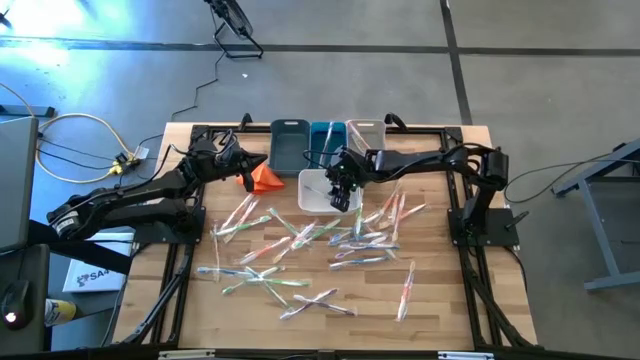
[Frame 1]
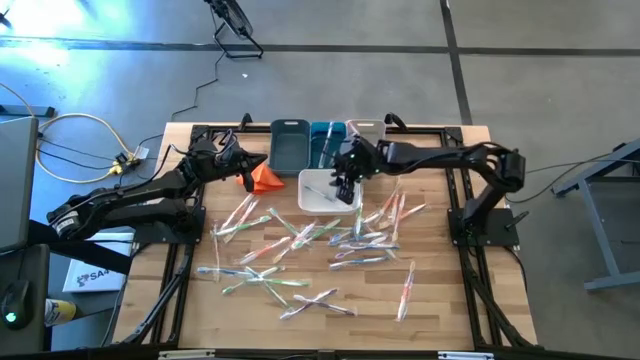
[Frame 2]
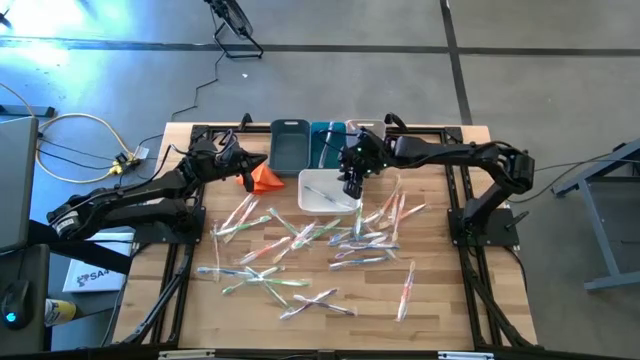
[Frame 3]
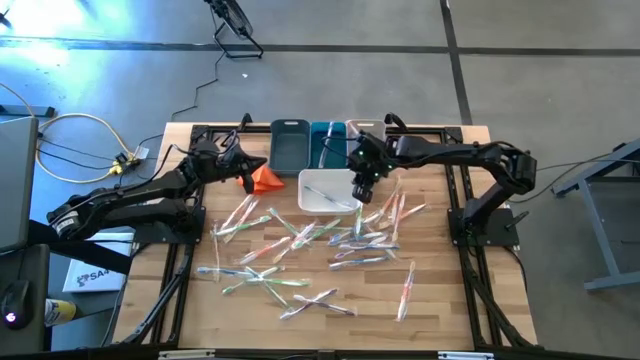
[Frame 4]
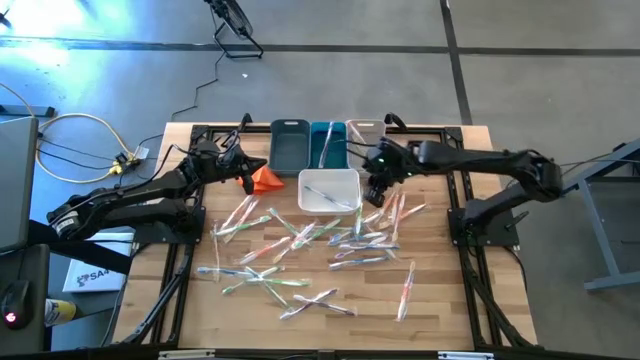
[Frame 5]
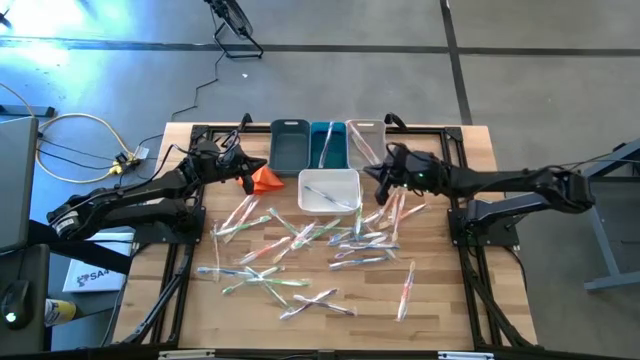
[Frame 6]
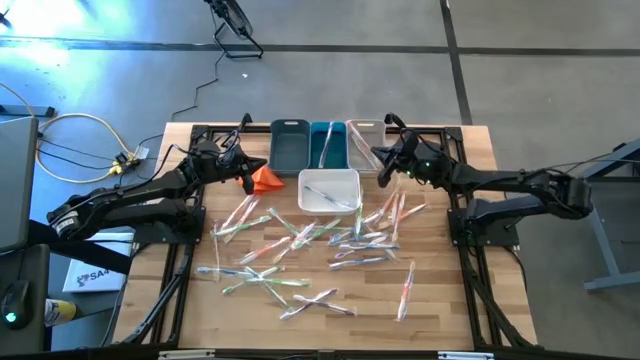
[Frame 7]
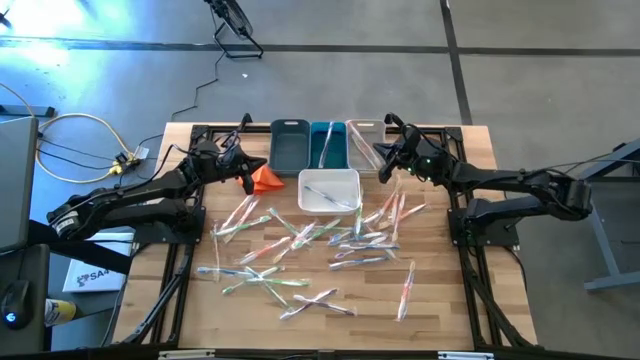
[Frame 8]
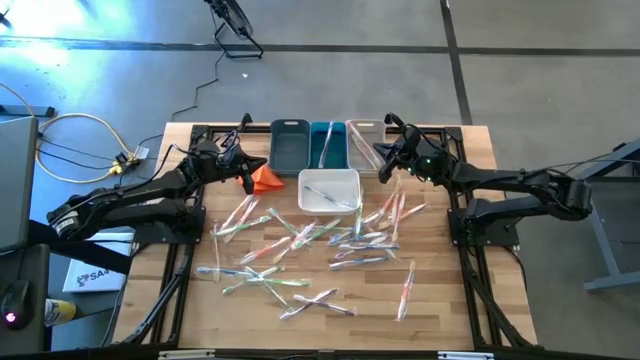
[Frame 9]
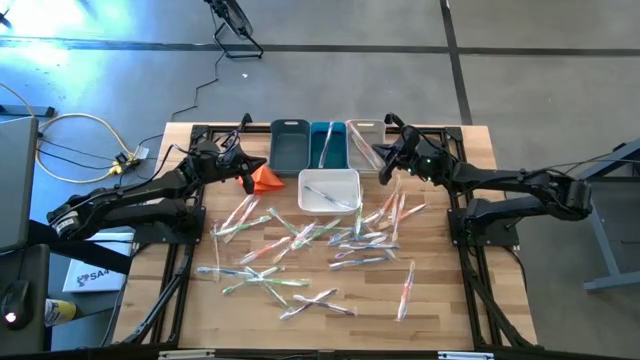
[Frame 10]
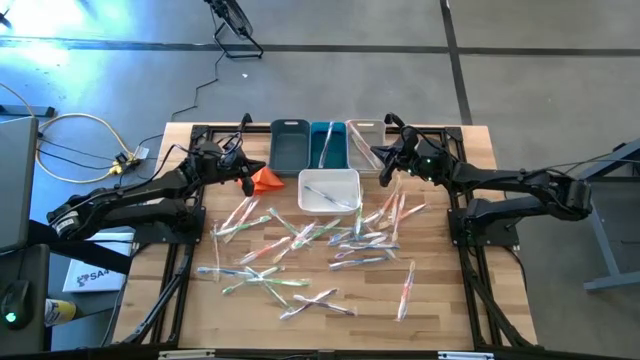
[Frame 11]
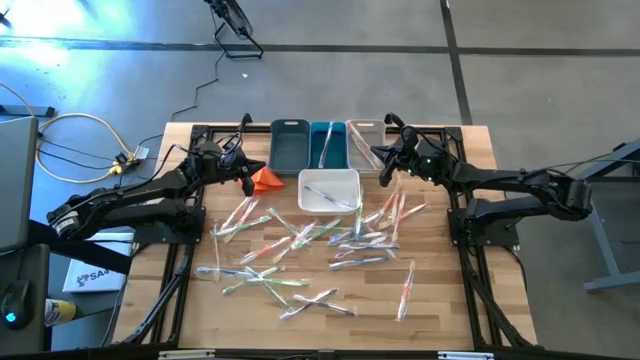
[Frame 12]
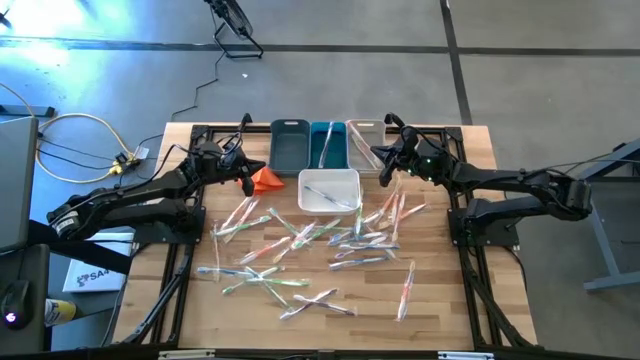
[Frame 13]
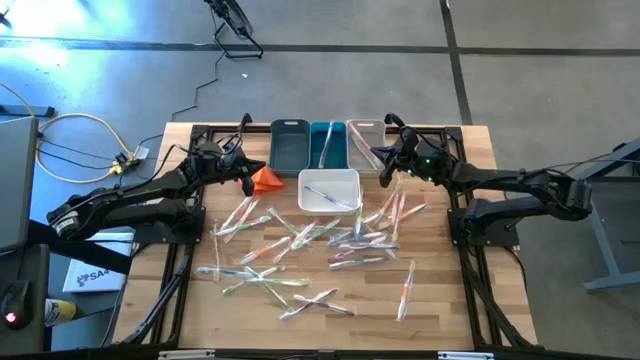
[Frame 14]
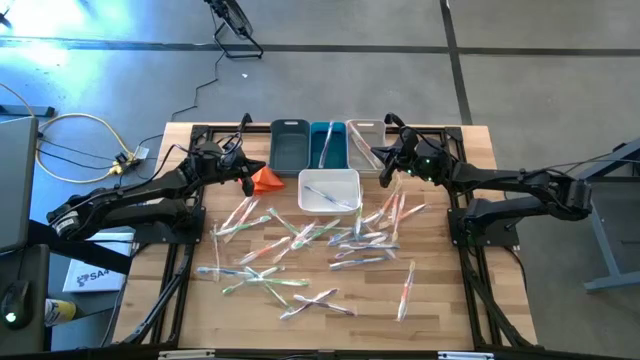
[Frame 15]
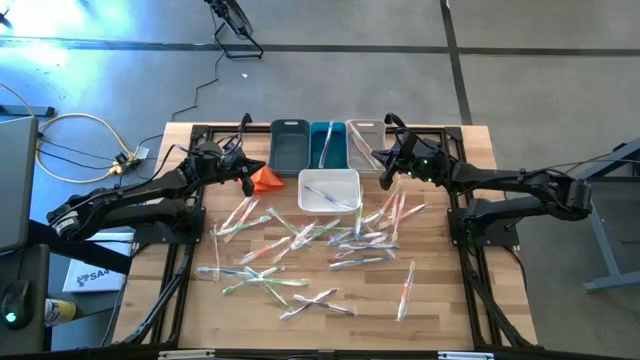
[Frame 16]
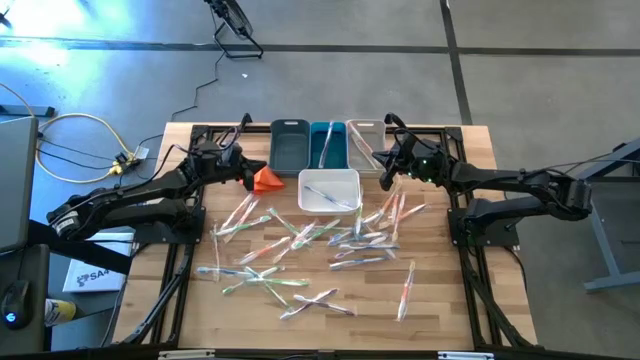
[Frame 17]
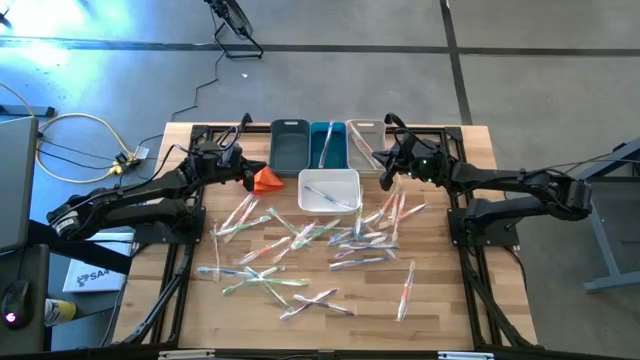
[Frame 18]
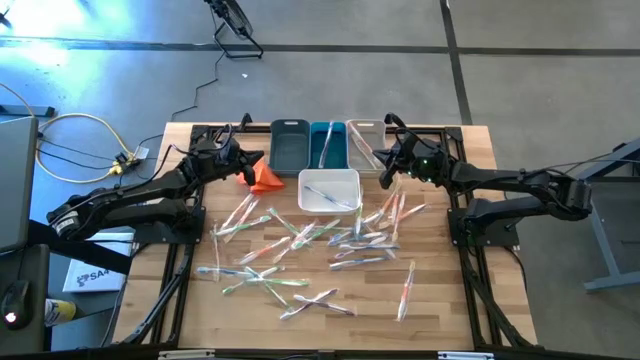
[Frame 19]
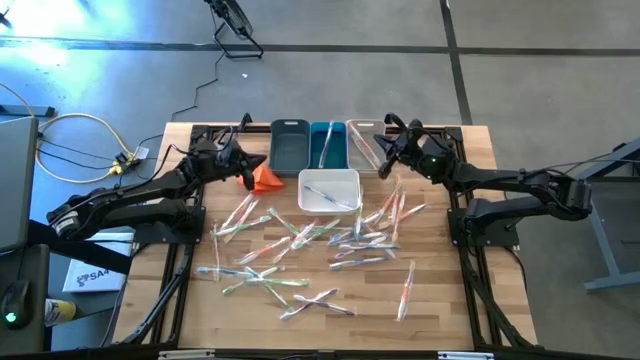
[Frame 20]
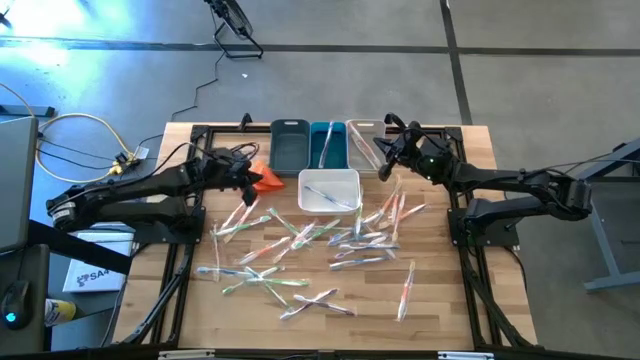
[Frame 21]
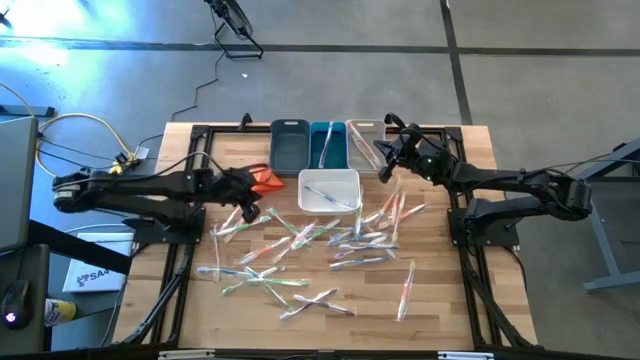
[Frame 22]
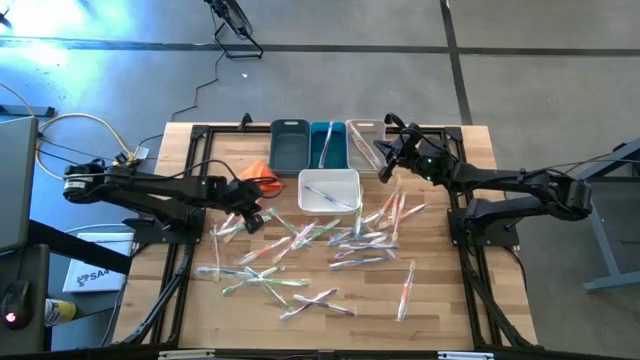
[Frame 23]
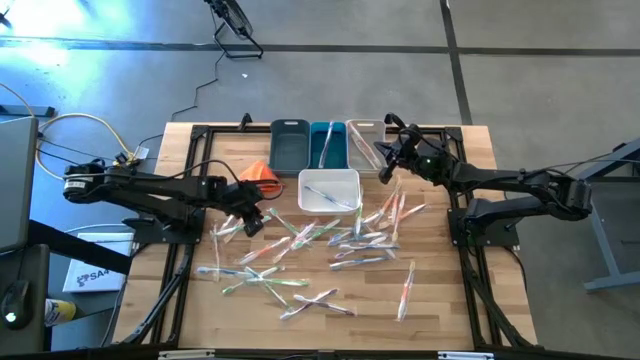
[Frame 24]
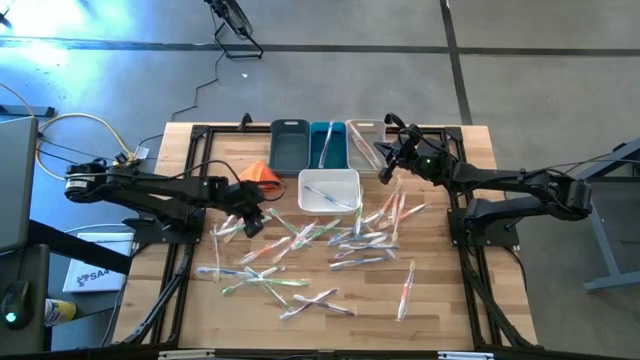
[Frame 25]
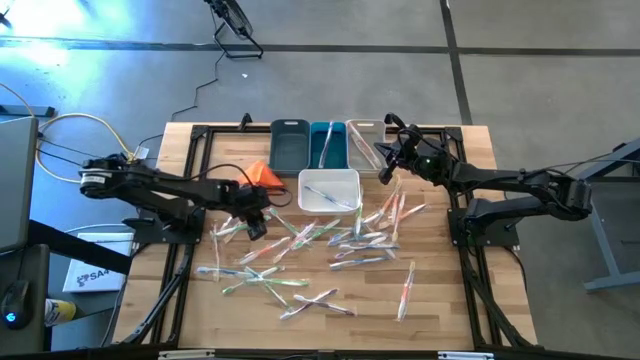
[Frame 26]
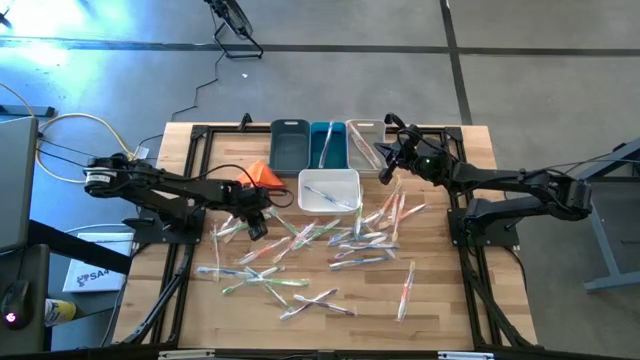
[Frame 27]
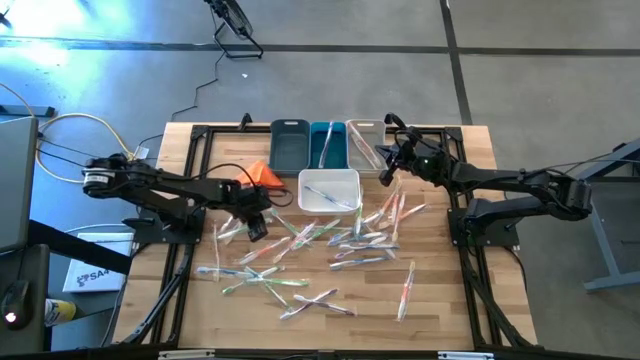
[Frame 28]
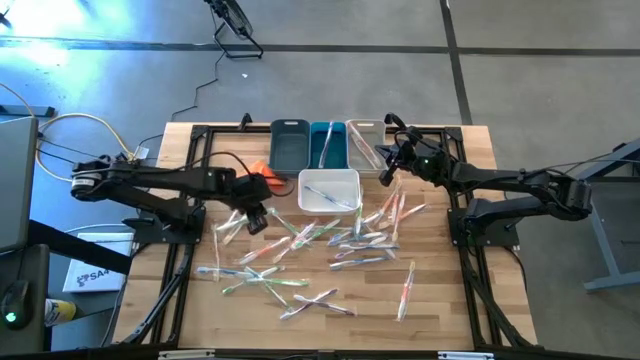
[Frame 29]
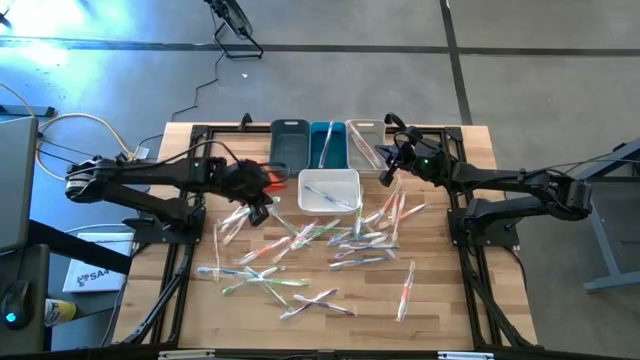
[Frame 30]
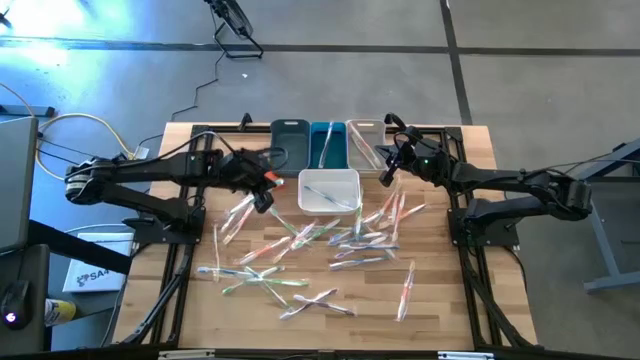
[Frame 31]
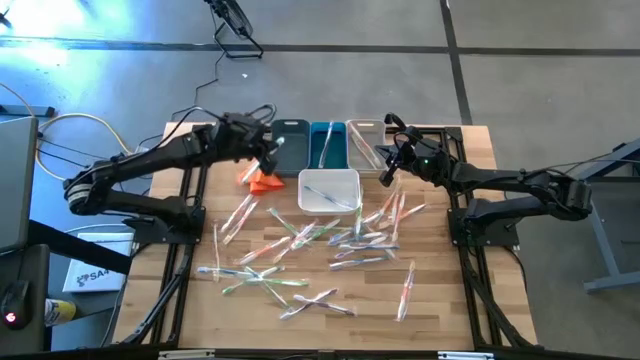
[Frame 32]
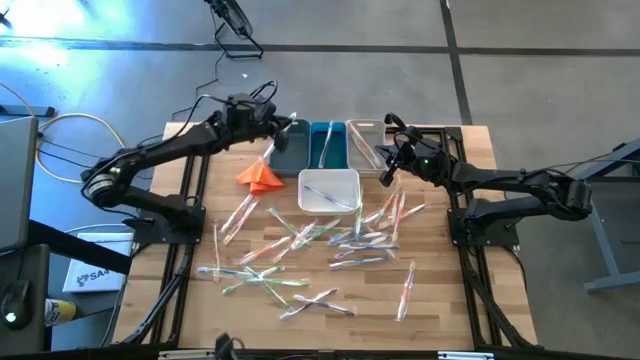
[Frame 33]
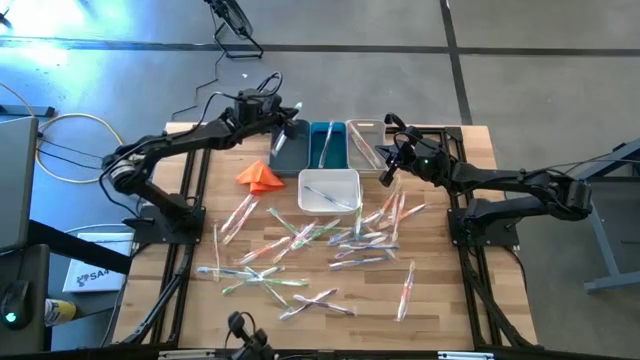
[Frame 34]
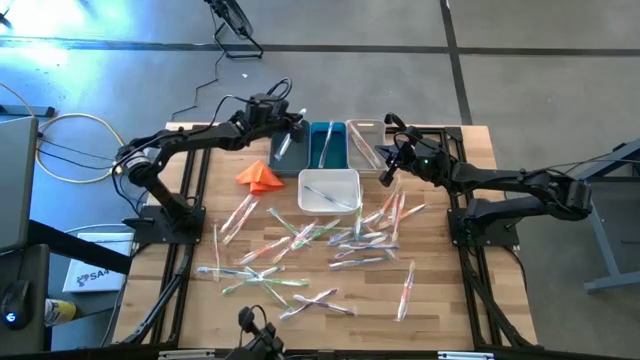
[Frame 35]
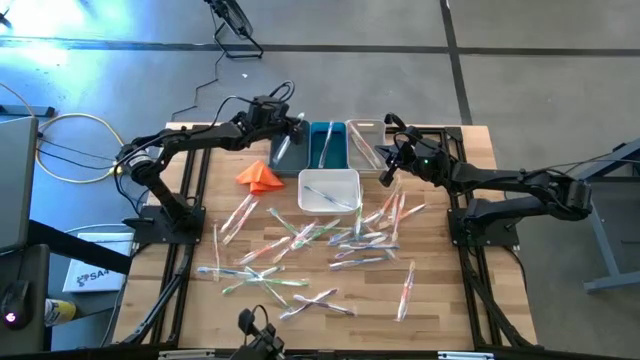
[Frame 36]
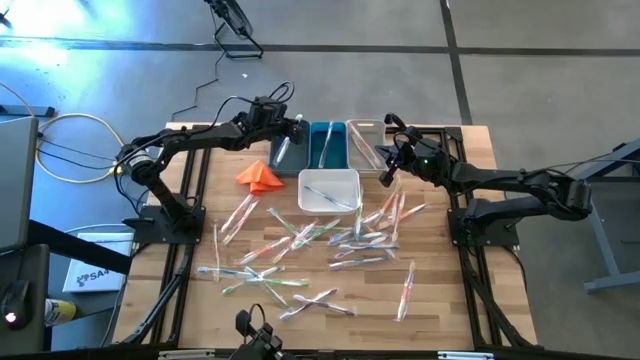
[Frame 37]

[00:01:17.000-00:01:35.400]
Task: Pick & Place Toothbrushes
Put the green toothbrush into the dark blue bin

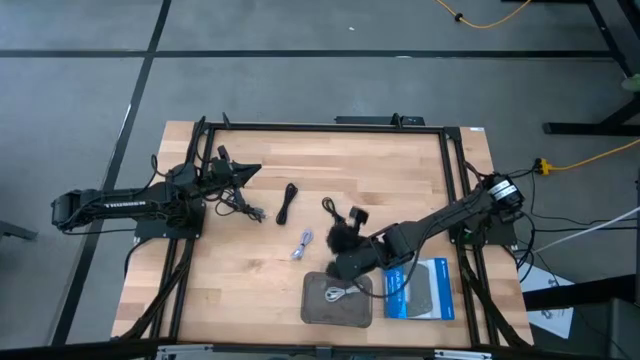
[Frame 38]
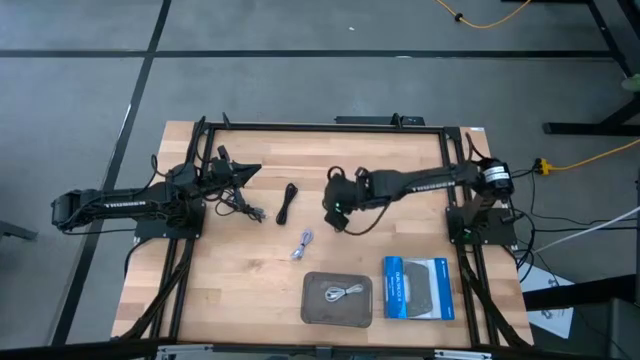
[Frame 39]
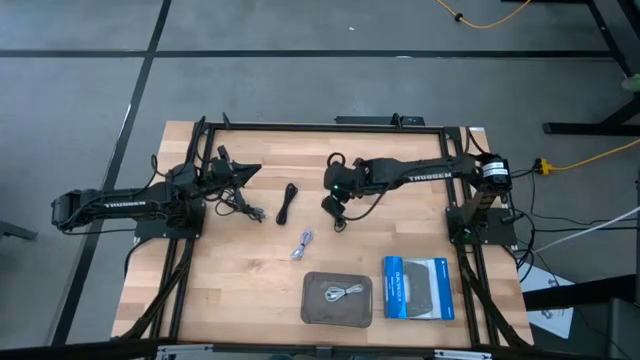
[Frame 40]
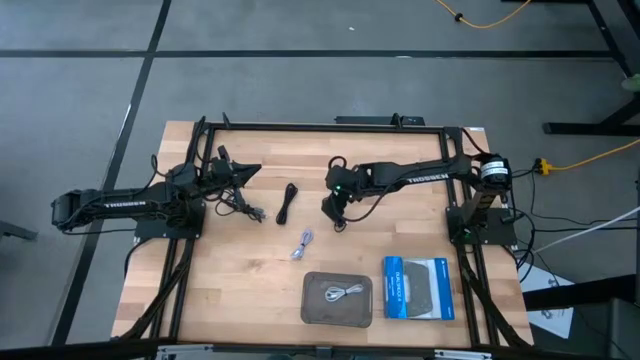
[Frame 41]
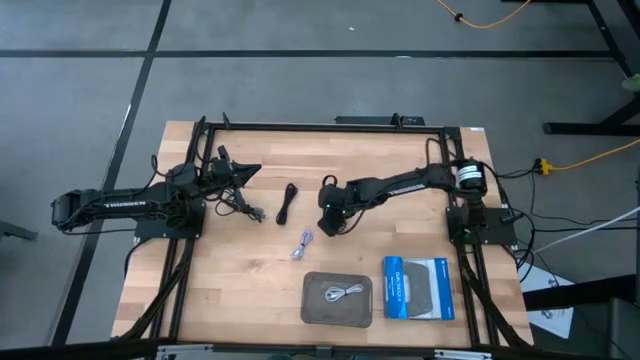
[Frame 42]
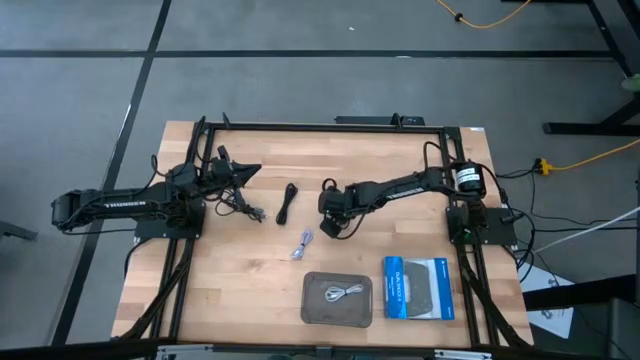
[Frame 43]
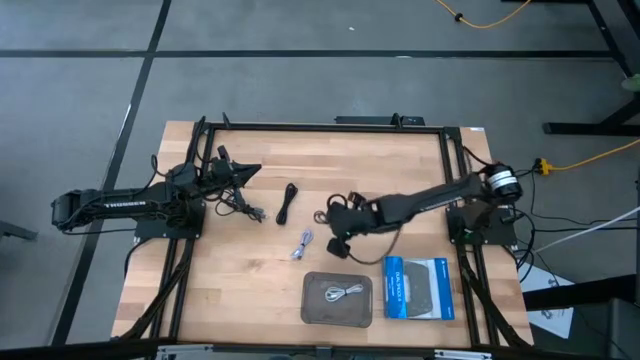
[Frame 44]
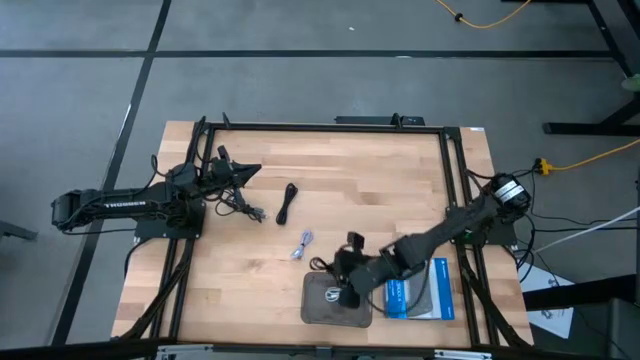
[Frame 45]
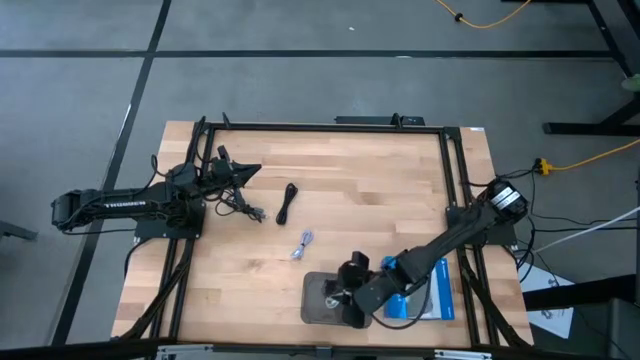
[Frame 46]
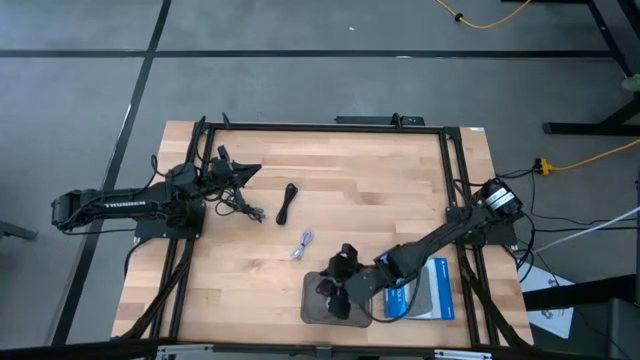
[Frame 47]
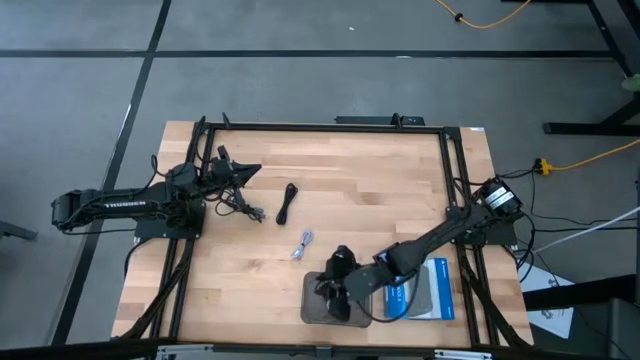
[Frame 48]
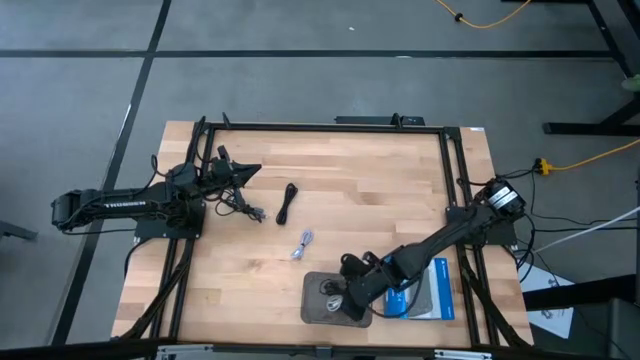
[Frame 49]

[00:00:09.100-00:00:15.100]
Task: Pick and place USB-C Cables
Put the right black charger cable into the black bin
